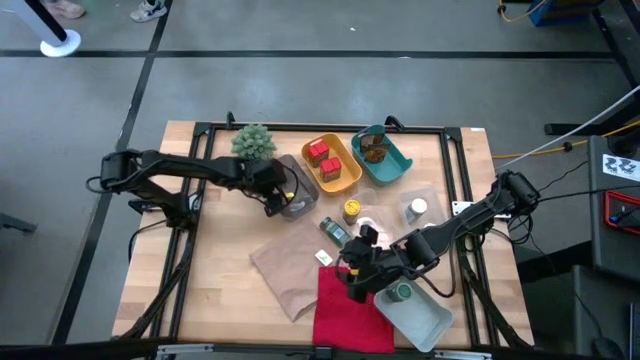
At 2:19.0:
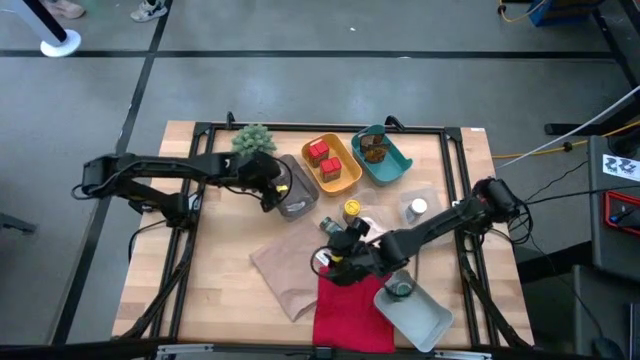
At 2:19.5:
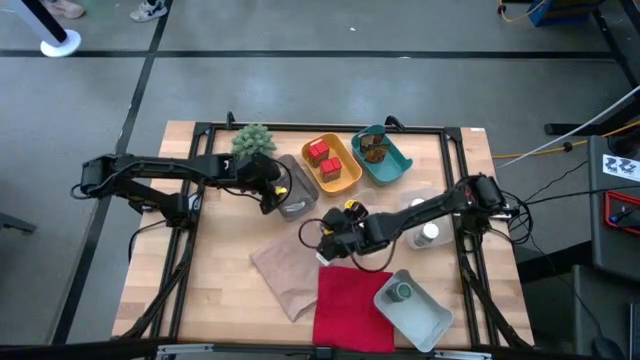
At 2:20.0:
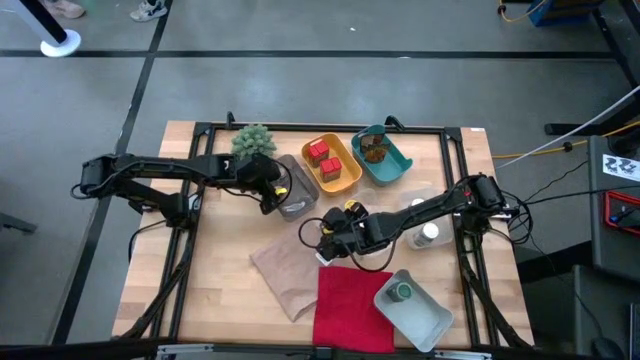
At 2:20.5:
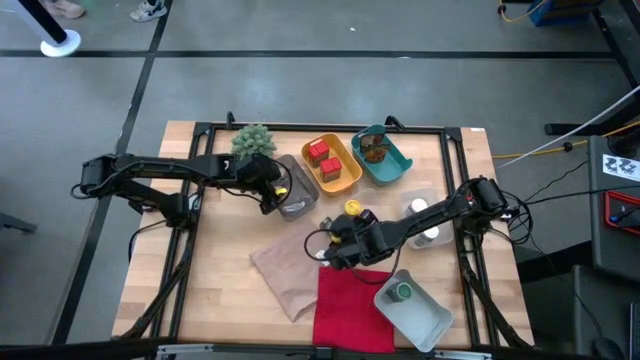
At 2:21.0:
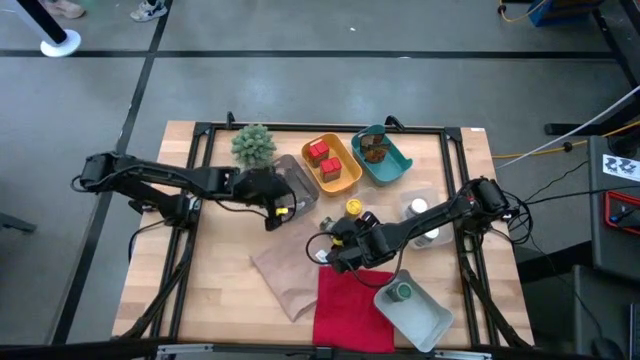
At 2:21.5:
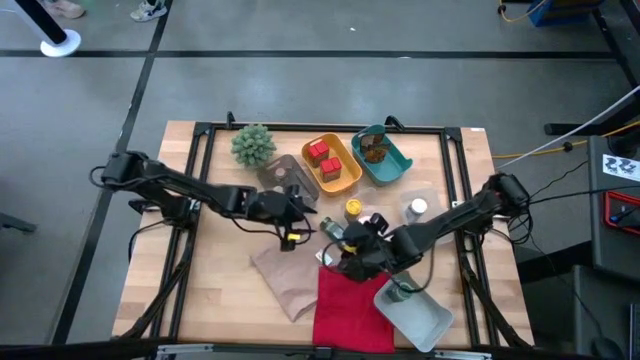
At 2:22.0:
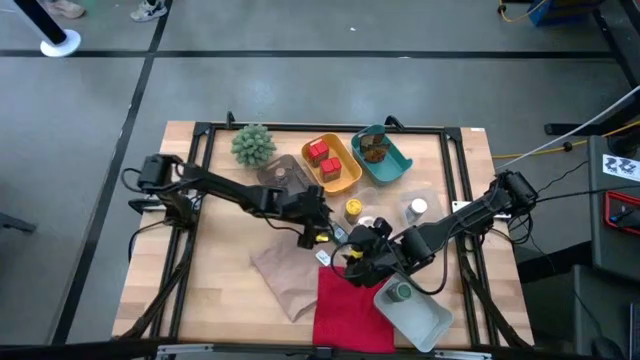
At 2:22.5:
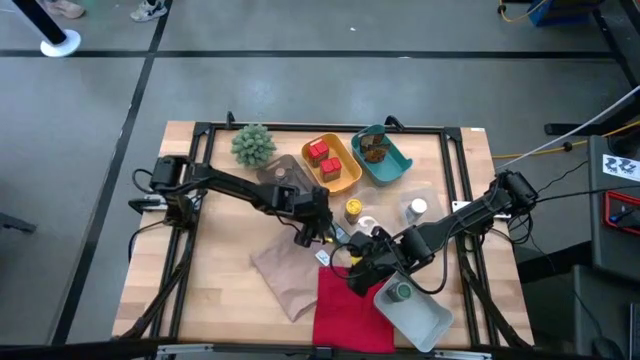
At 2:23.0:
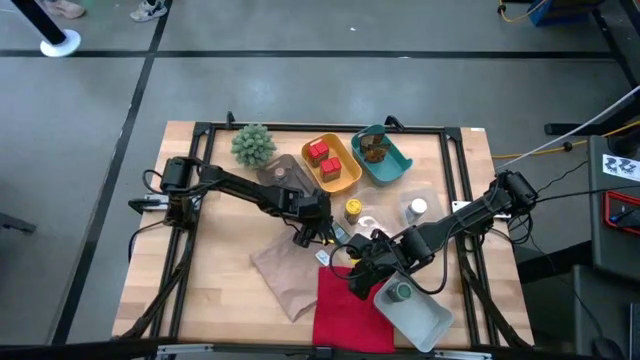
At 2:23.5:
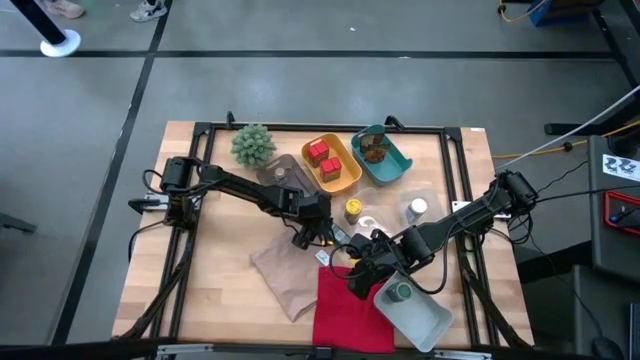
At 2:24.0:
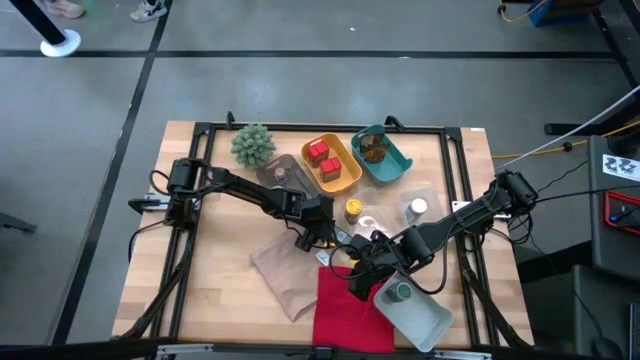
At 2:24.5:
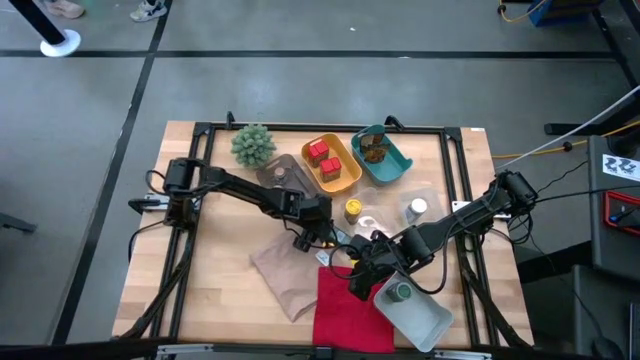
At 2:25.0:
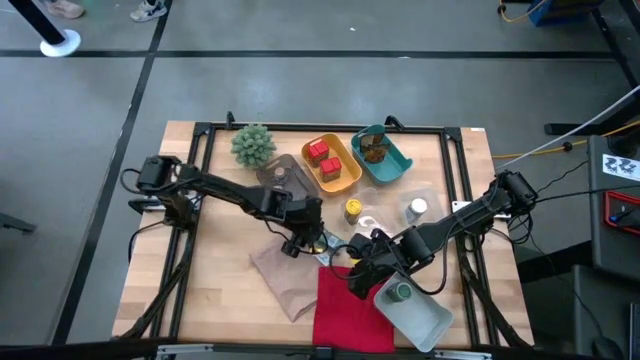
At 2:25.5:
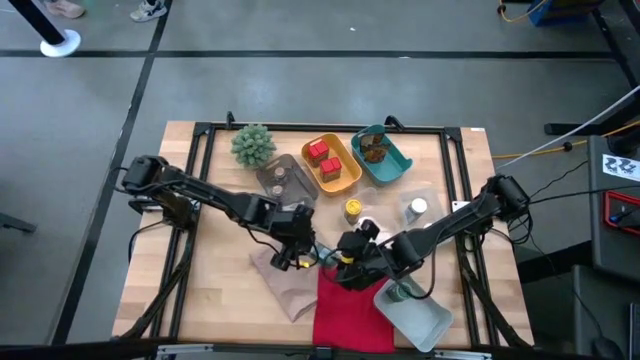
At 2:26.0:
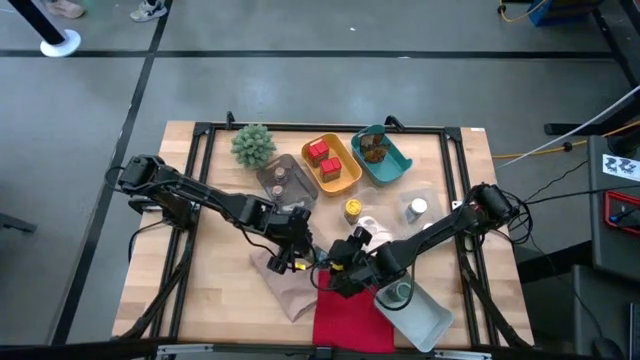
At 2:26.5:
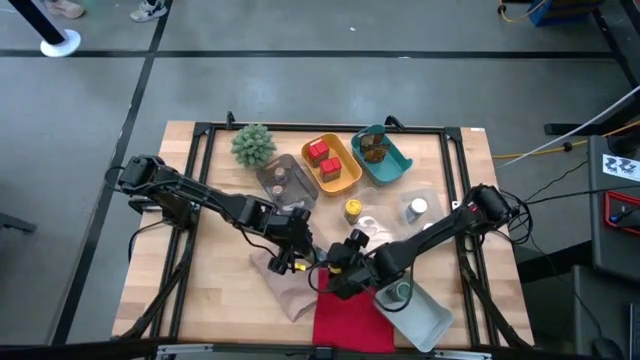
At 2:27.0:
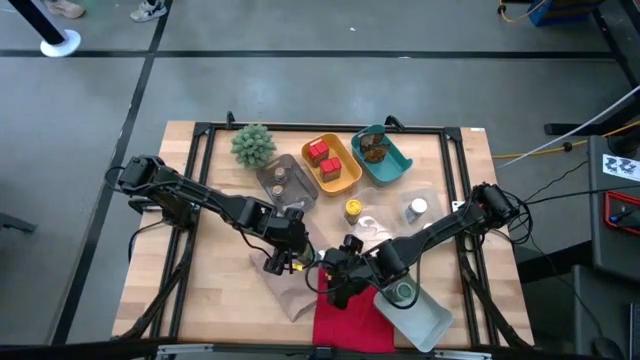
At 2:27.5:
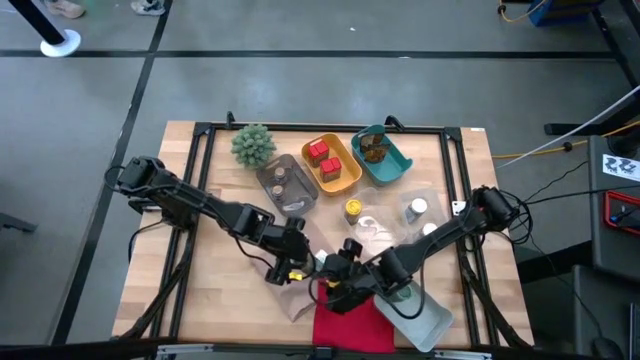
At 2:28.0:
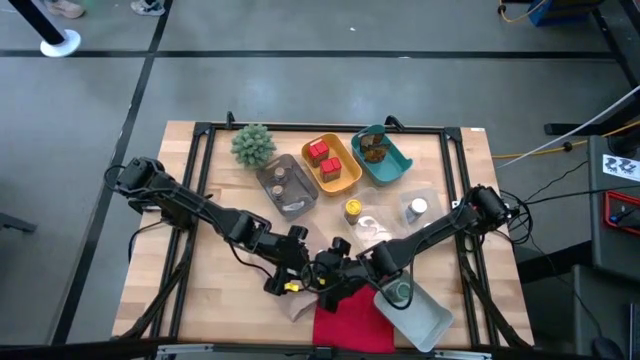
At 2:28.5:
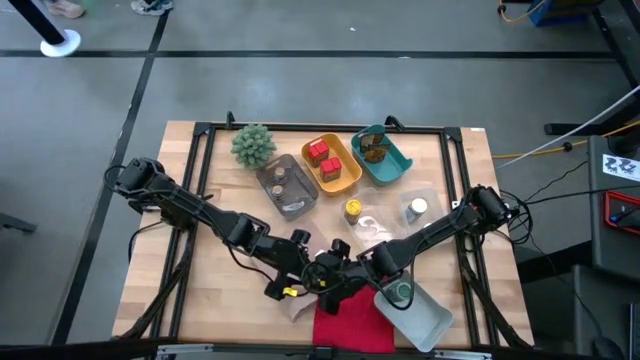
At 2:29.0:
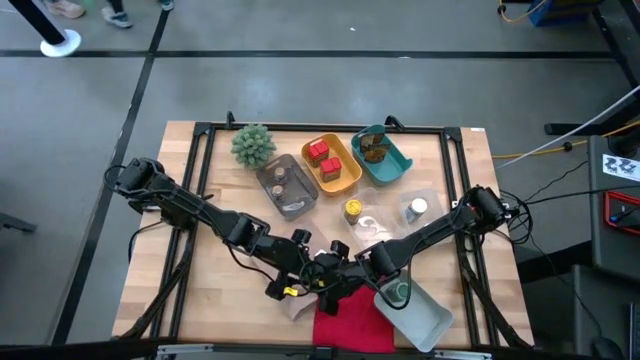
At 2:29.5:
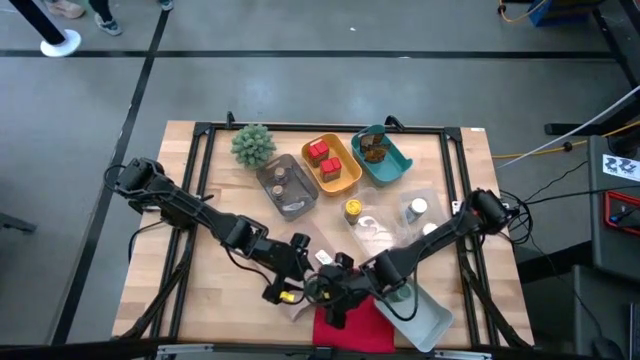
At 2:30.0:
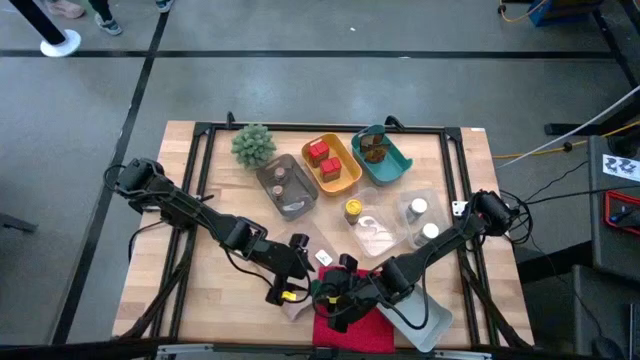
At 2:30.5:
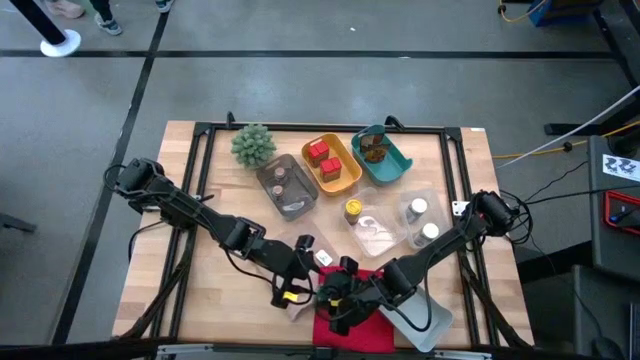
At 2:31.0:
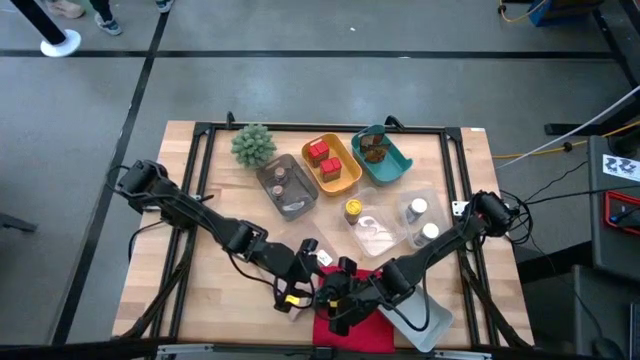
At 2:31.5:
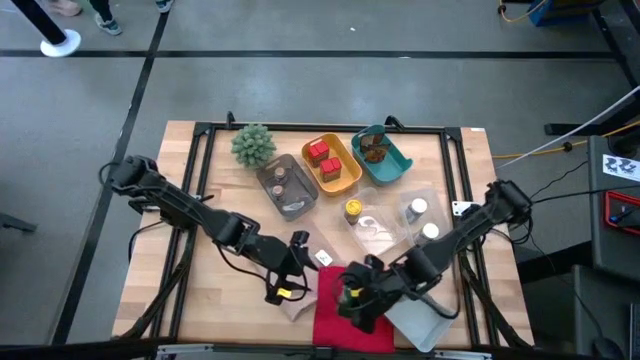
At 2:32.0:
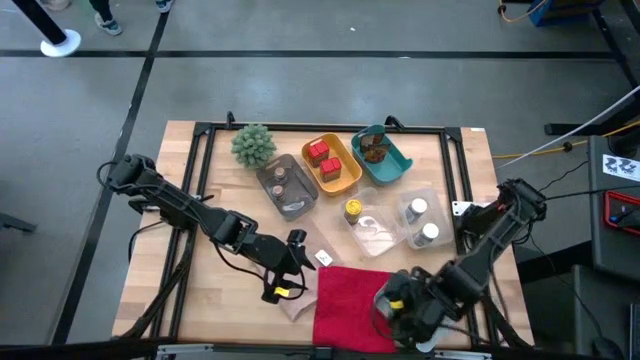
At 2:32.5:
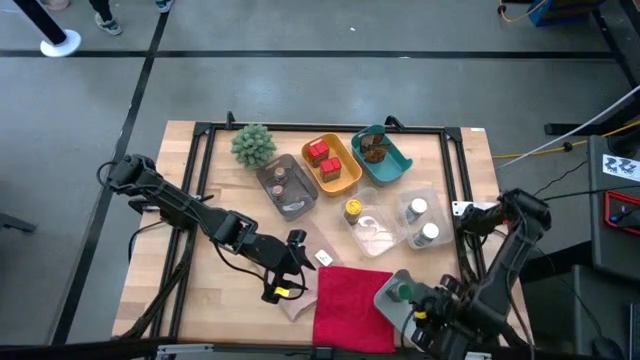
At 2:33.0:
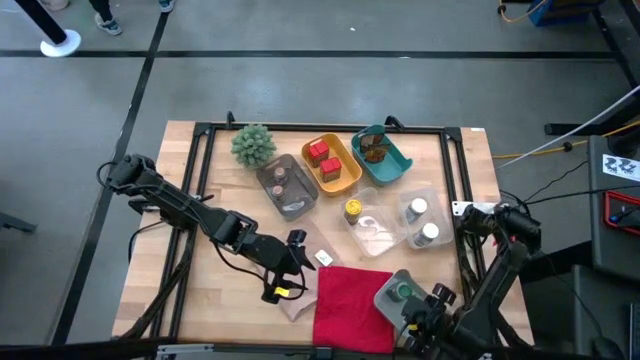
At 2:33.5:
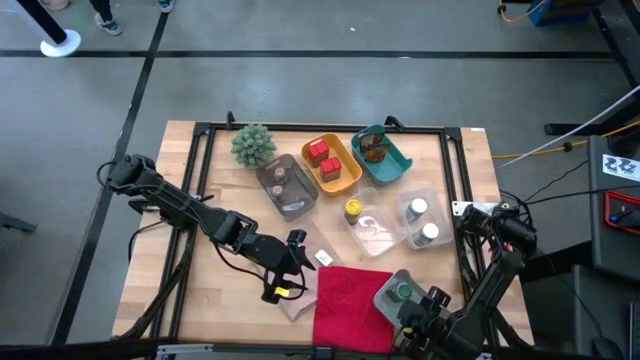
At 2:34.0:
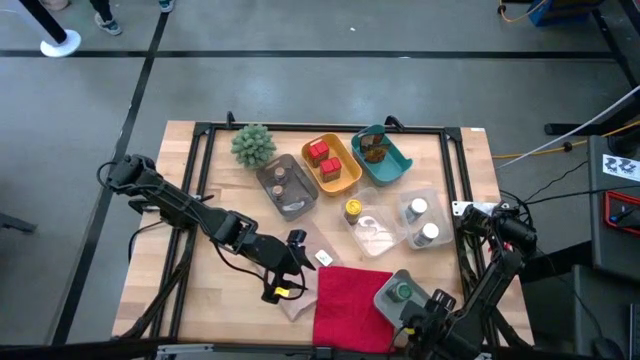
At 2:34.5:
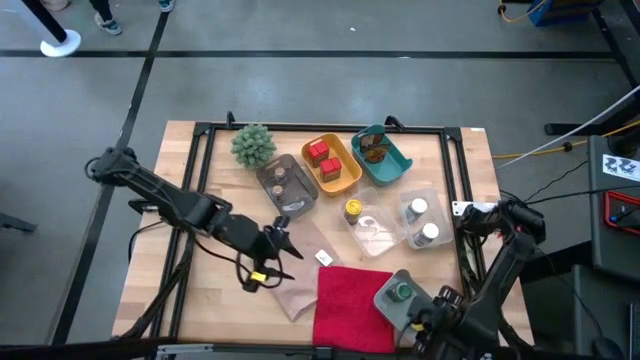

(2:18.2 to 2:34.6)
Task: Sort spices by type
Put the green seasoning bottle into the gray bin

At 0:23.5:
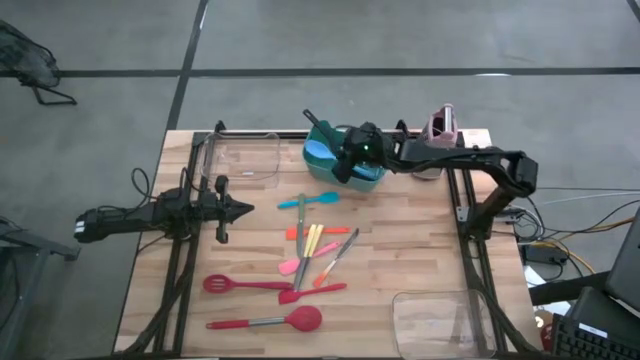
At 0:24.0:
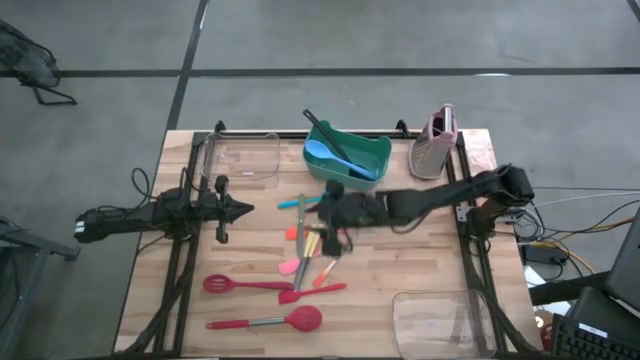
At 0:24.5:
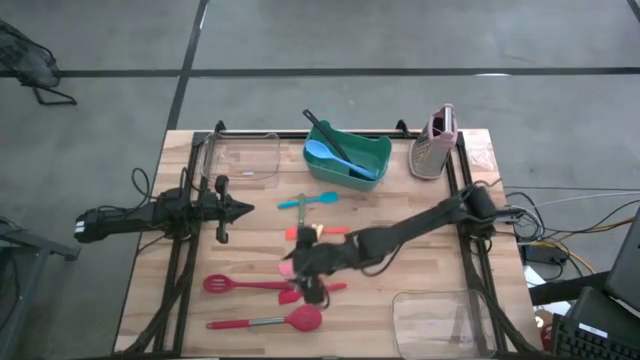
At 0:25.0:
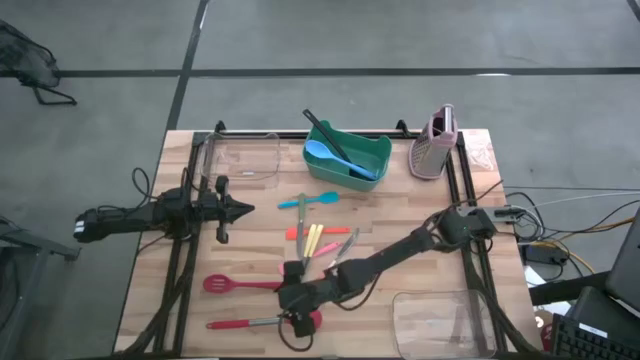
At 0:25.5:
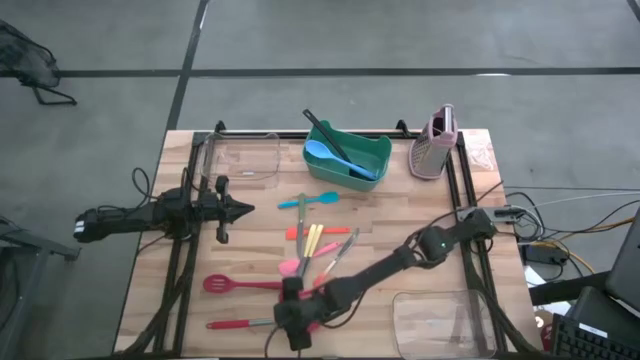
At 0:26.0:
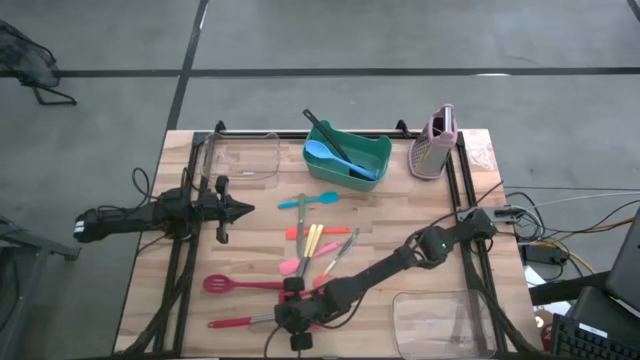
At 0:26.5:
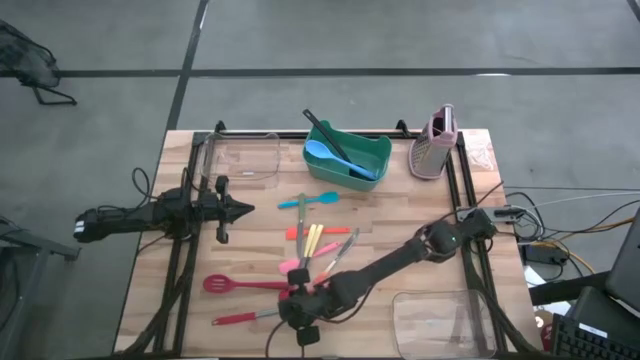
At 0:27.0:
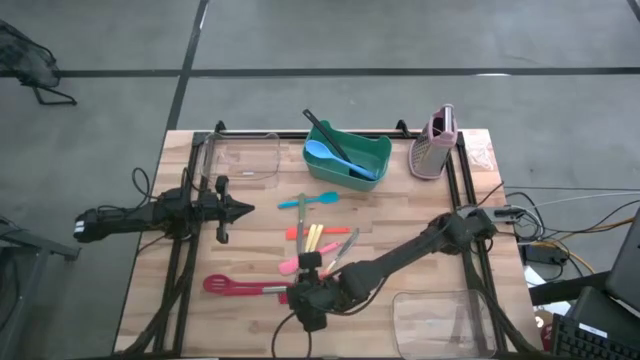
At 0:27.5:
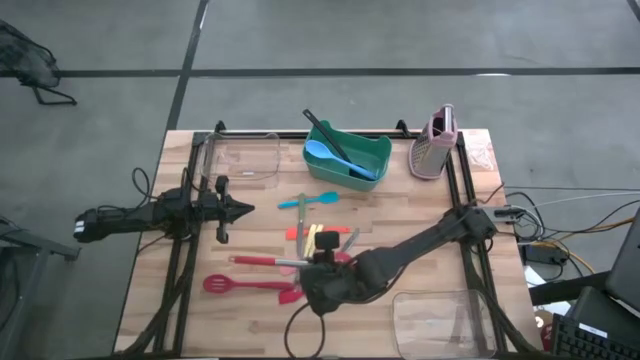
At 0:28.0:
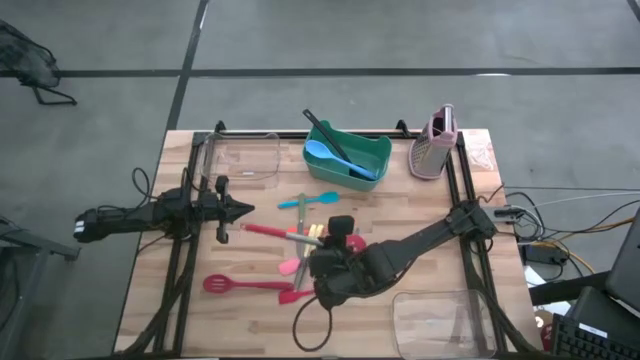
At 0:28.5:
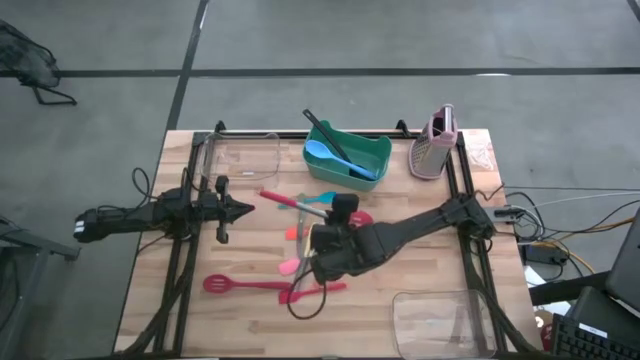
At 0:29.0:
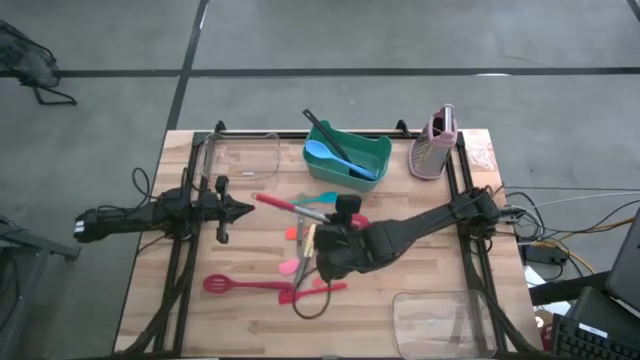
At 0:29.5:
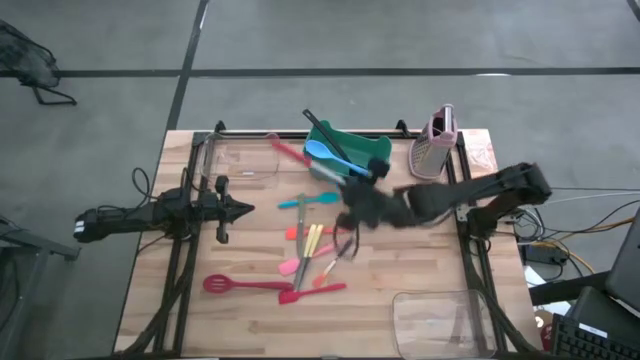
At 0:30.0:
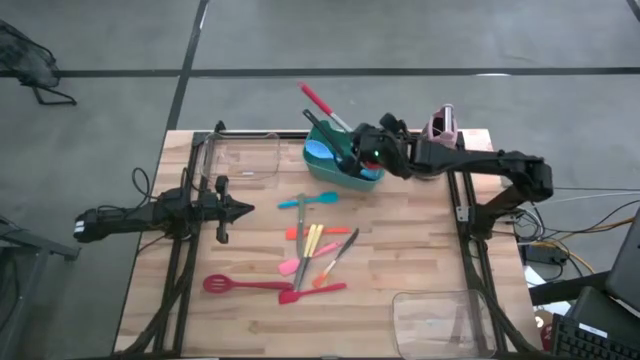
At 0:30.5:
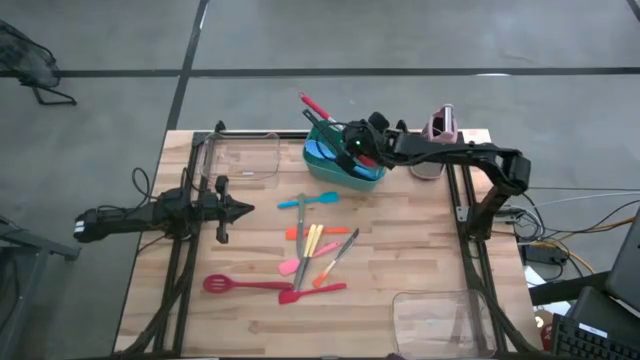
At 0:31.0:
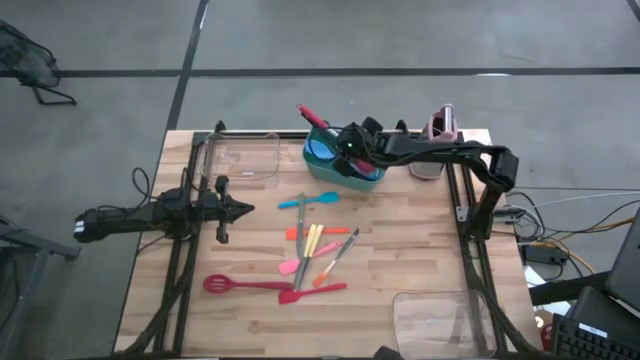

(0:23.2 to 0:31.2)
Task: Pick & Place Kitchen Items
Put the red and silver serving spoon into the green bin
